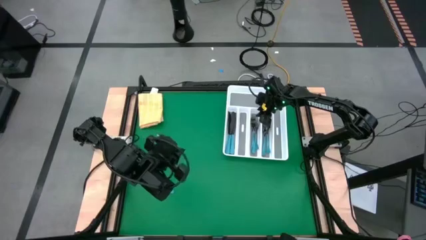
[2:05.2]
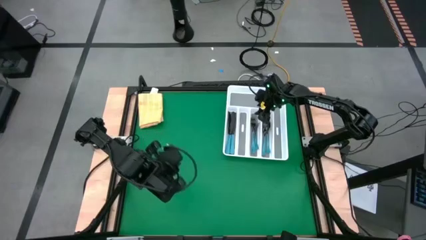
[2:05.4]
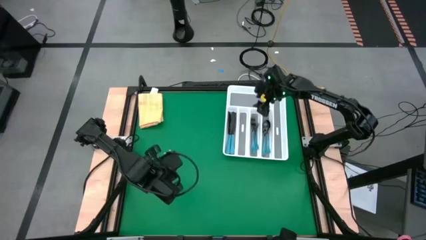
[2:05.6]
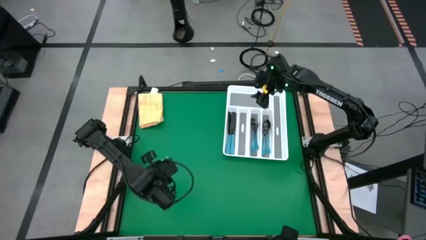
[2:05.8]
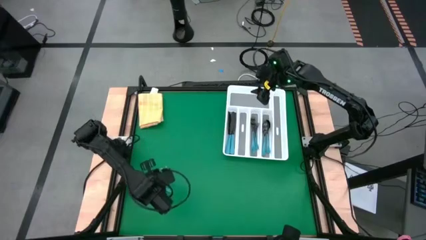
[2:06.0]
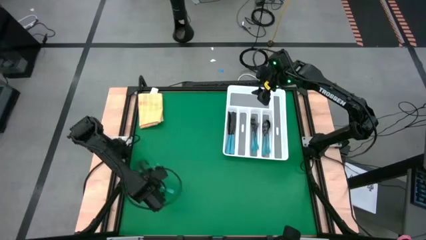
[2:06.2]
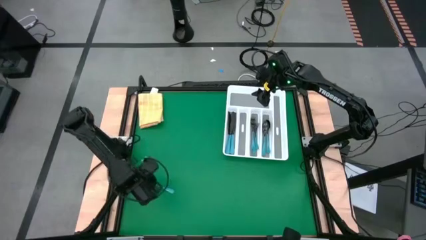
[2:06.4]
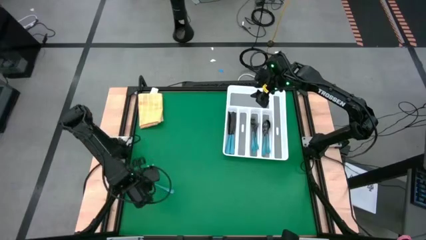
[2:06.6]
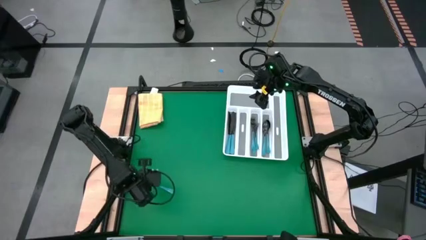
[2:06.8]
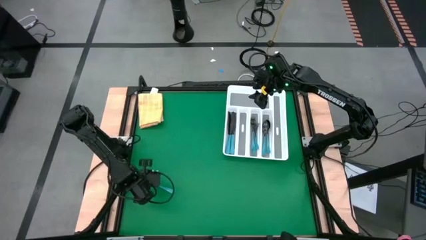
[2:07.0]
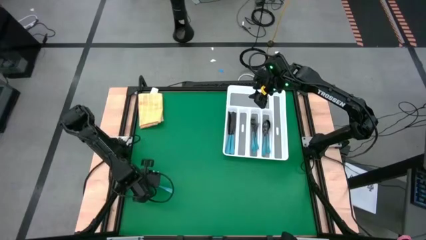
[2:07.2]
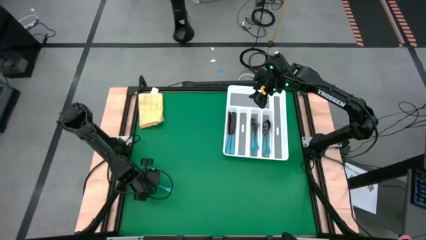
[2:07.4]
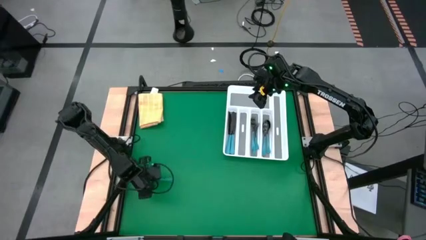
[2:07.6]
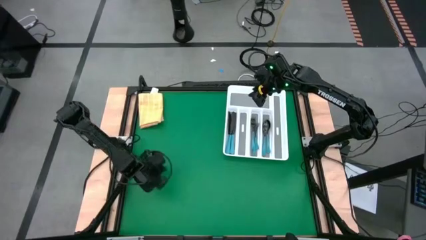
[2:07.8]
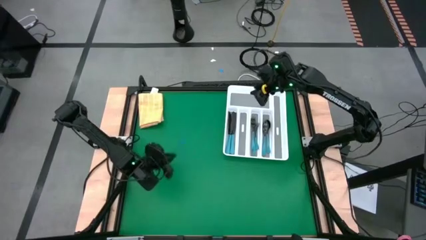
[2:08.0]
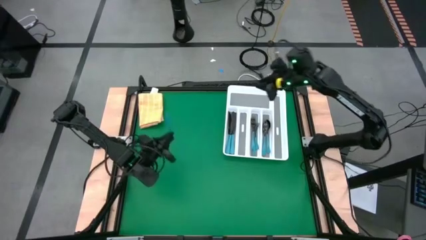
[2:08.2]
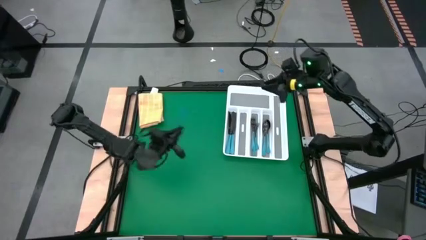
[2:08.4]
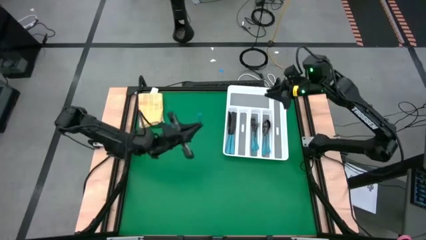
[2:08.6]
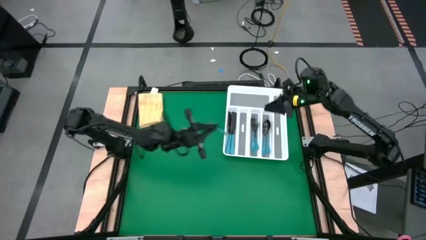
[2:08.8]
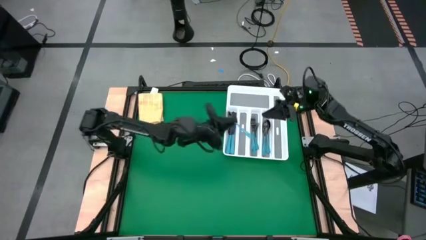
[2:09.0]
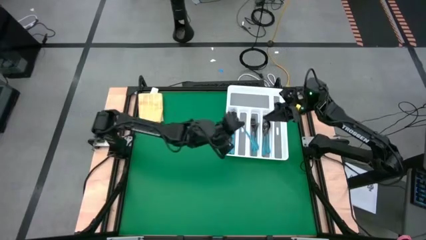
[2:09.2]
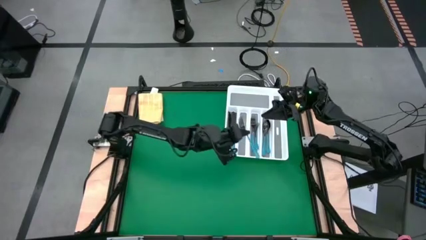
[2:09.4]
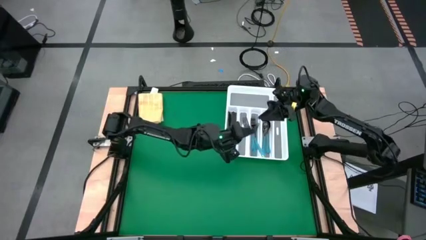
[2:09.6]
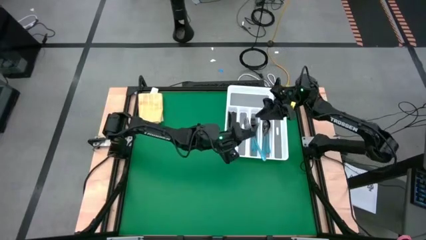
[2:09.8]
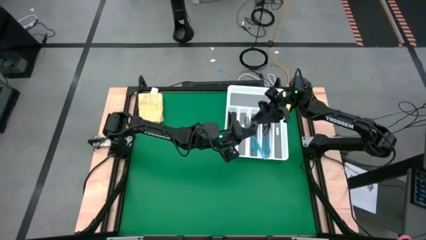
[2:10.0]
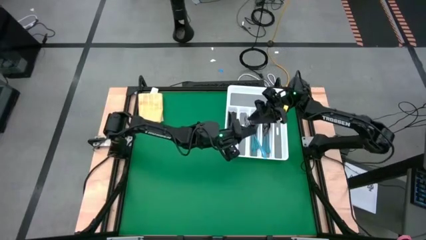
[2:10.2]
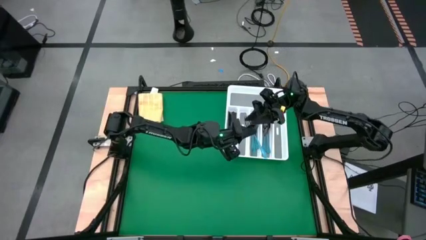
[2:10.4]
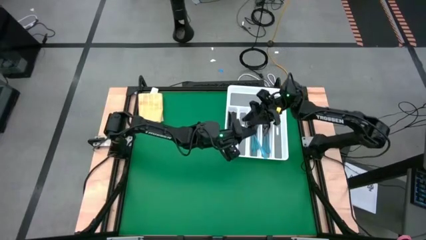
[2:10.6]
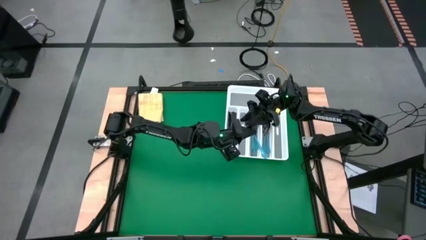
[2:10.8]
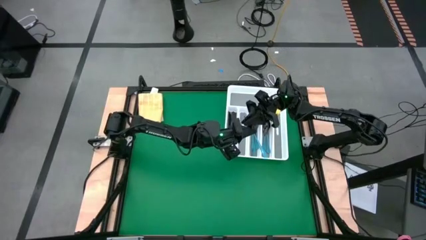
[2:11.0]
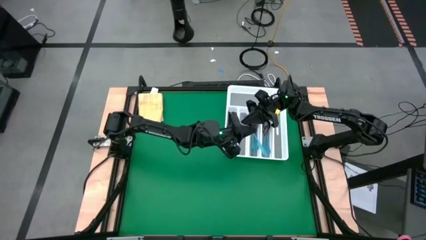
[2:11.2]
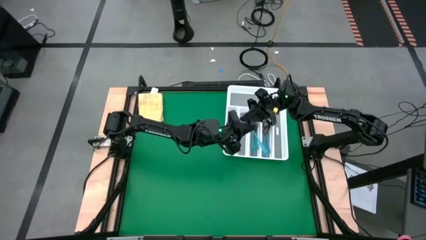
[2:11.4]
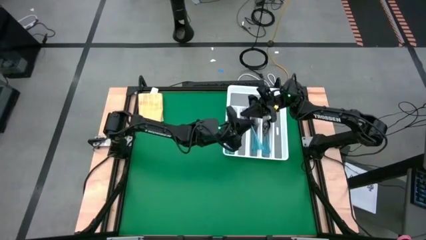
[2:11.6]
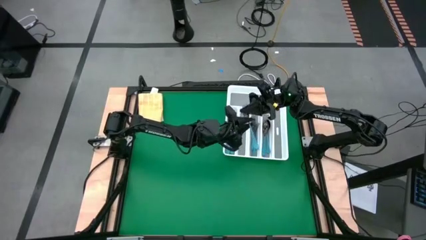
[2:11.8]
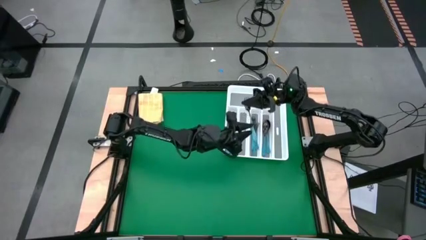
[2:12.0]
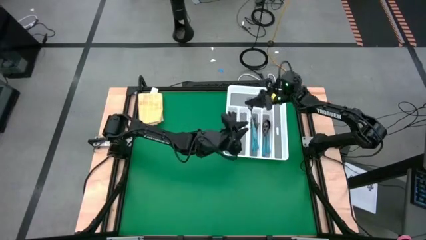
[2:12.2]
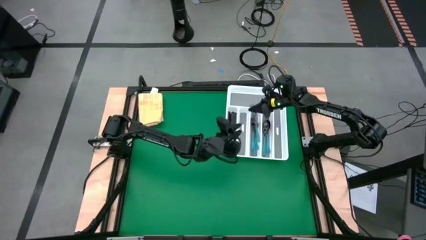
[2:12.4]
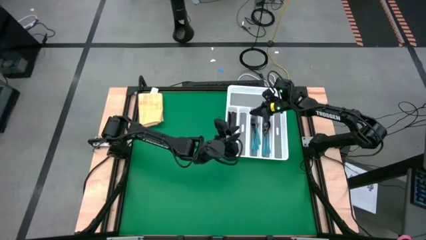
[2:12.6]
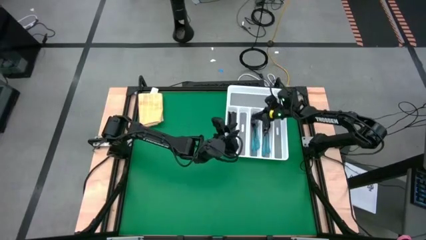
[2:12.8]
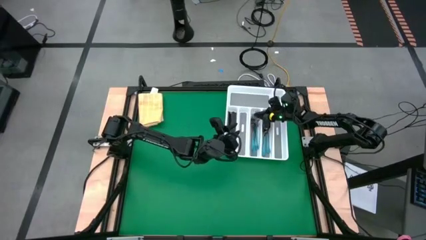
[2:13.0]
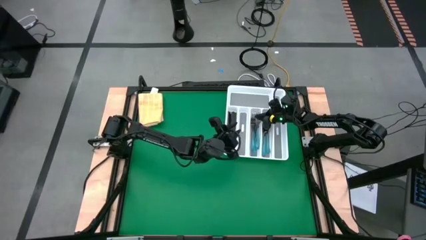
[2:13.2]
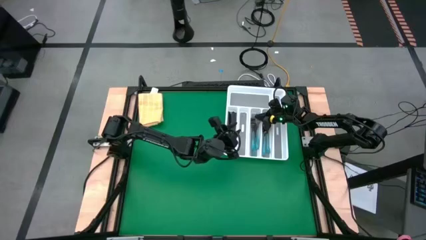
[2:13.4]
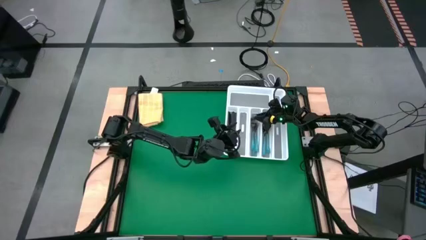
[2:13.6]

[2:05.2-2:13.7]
Task: Sort silverware
Put the blue fork into the white cutlery tray
